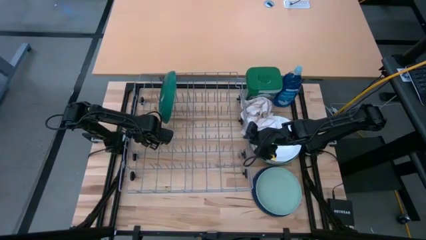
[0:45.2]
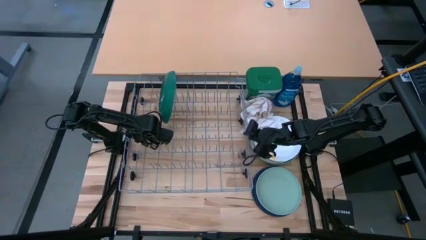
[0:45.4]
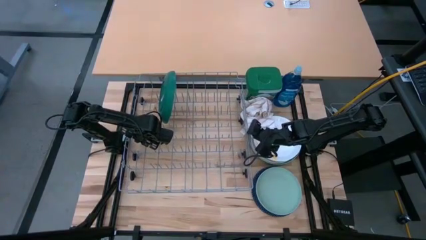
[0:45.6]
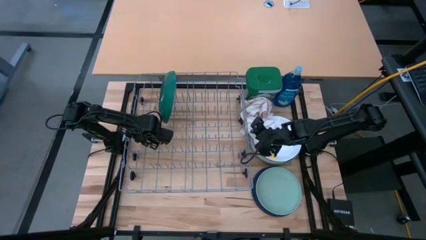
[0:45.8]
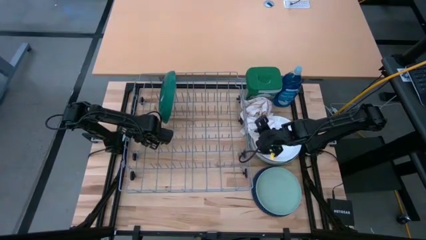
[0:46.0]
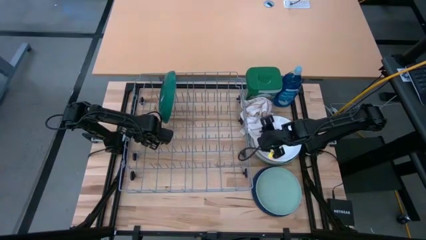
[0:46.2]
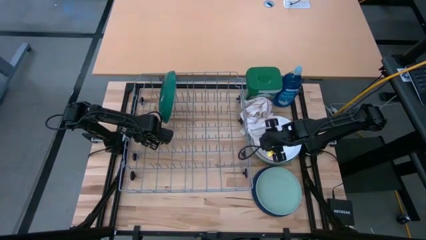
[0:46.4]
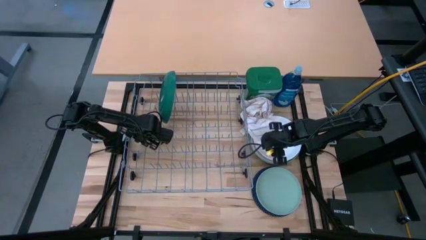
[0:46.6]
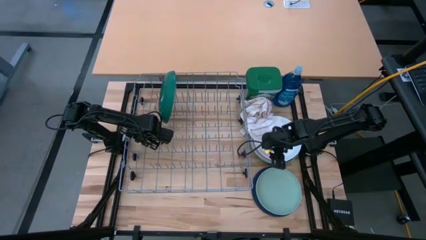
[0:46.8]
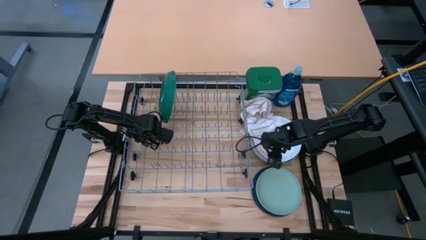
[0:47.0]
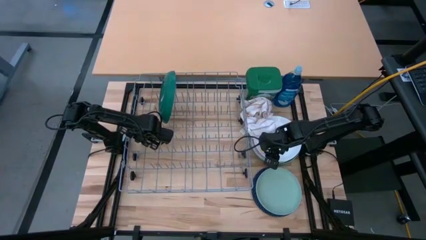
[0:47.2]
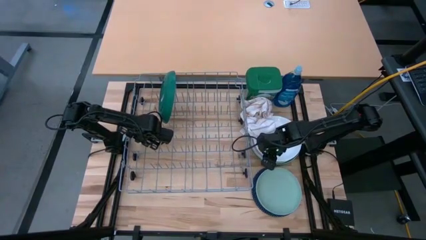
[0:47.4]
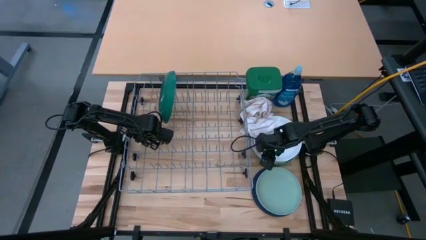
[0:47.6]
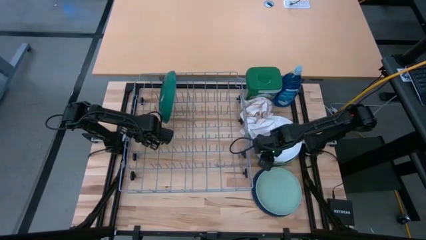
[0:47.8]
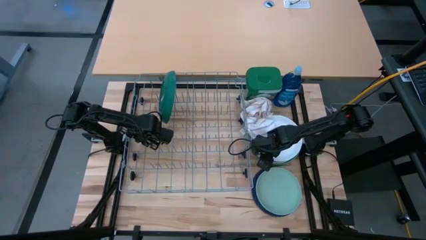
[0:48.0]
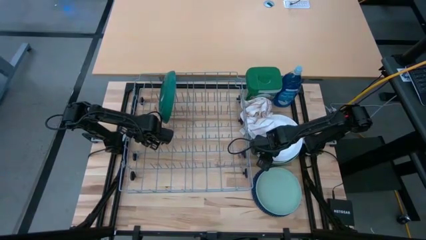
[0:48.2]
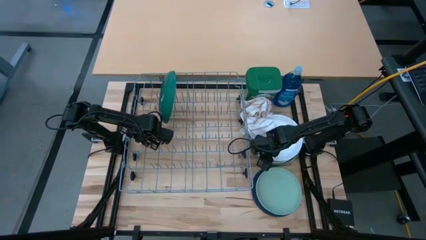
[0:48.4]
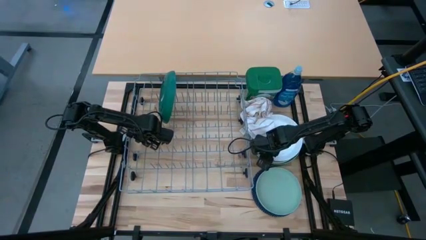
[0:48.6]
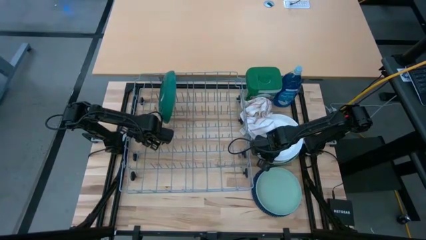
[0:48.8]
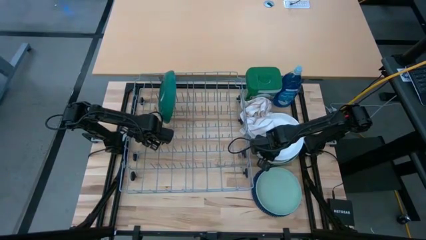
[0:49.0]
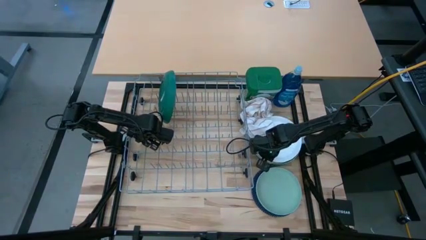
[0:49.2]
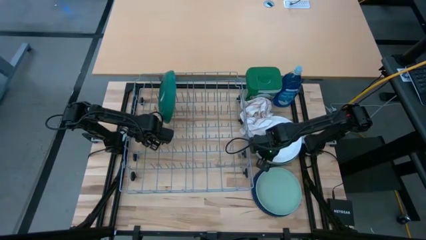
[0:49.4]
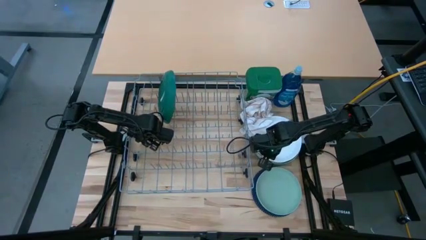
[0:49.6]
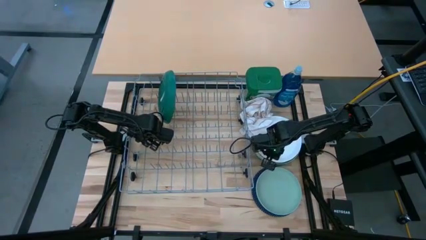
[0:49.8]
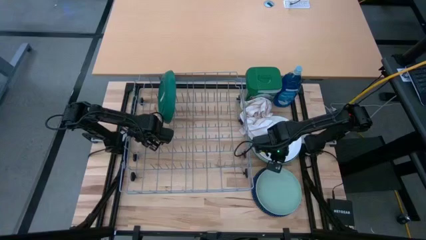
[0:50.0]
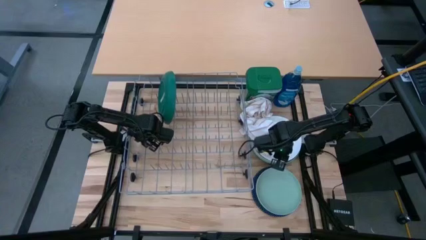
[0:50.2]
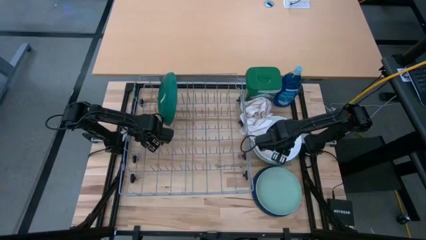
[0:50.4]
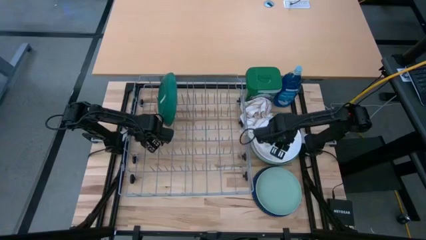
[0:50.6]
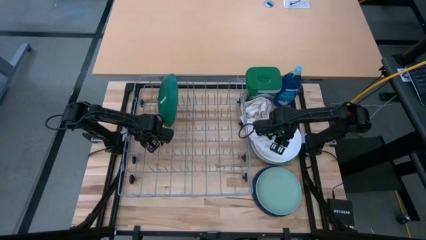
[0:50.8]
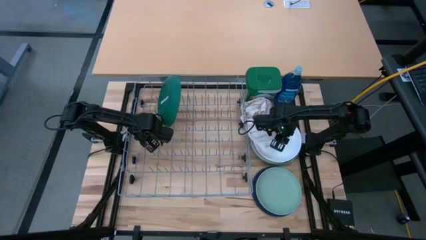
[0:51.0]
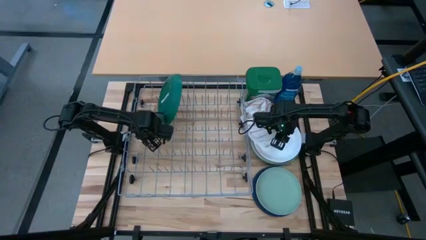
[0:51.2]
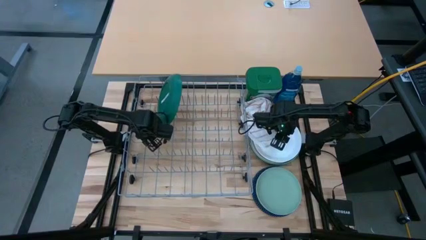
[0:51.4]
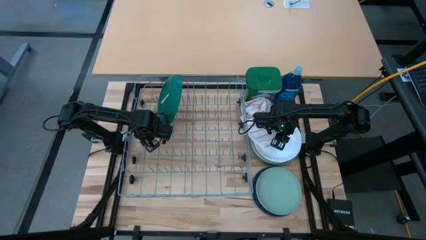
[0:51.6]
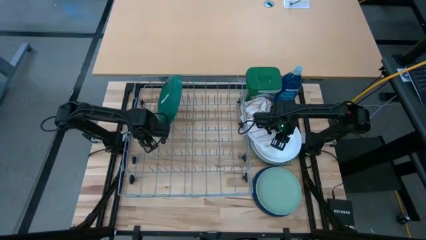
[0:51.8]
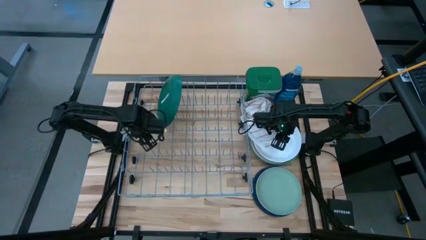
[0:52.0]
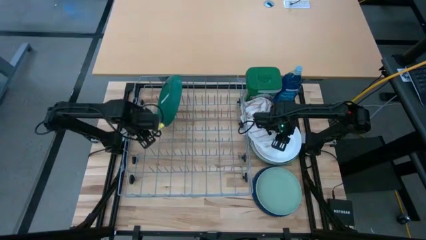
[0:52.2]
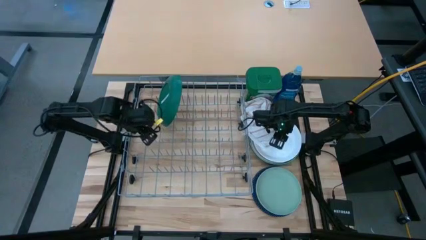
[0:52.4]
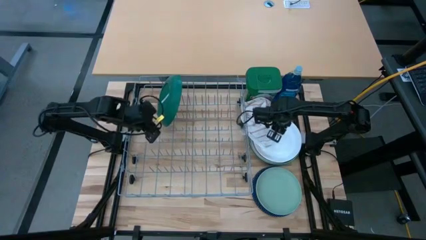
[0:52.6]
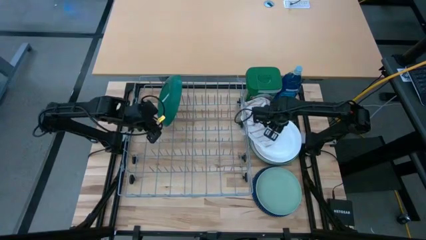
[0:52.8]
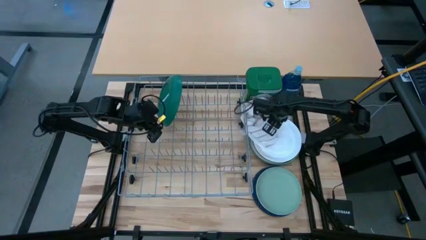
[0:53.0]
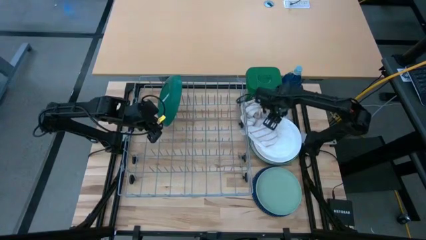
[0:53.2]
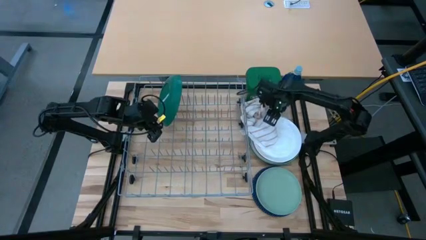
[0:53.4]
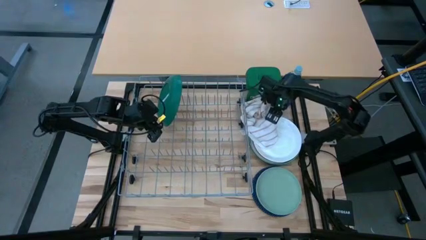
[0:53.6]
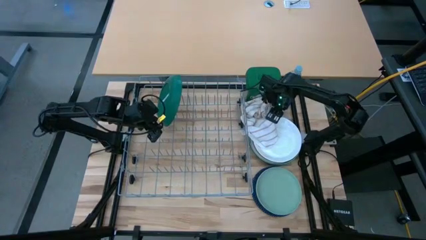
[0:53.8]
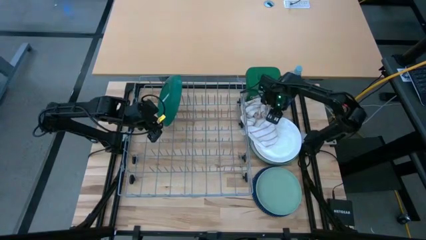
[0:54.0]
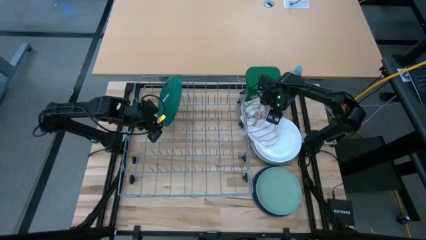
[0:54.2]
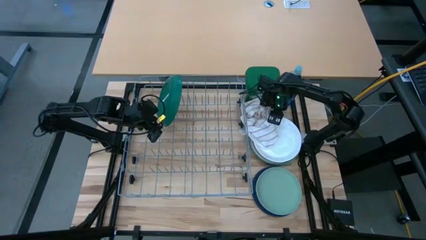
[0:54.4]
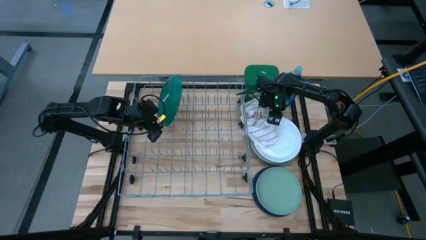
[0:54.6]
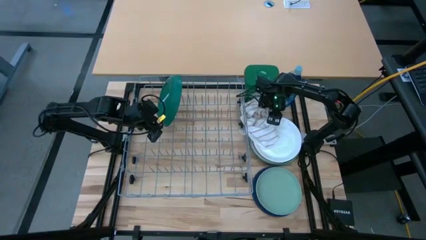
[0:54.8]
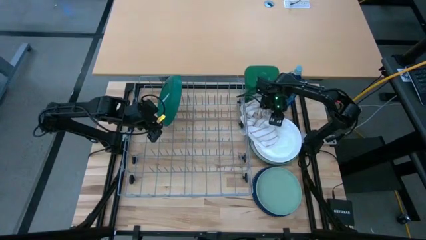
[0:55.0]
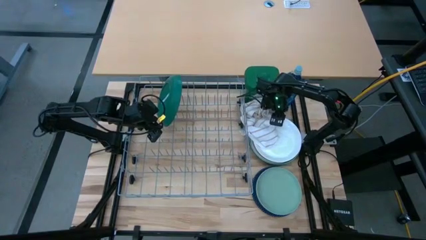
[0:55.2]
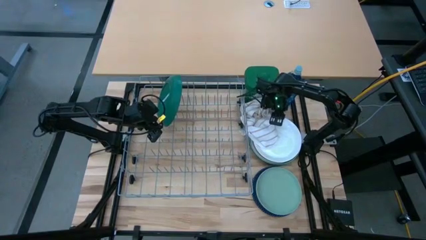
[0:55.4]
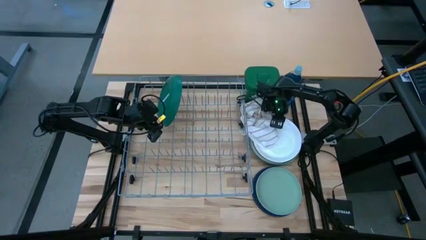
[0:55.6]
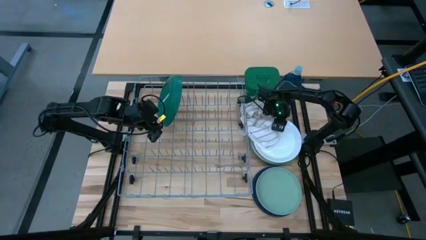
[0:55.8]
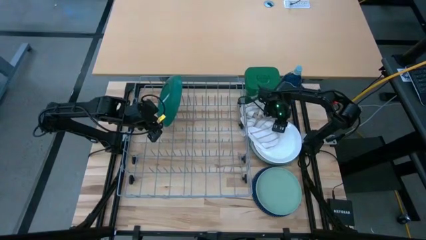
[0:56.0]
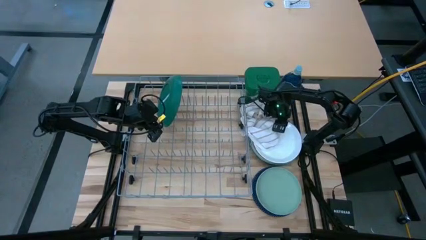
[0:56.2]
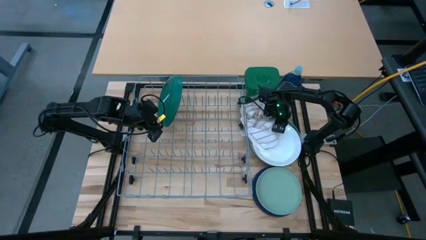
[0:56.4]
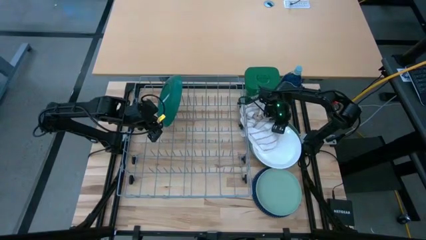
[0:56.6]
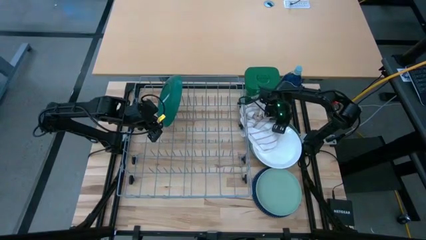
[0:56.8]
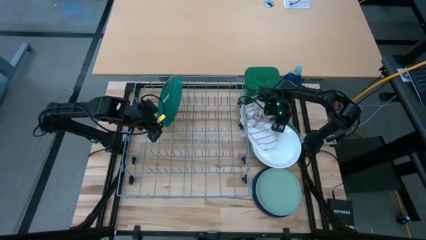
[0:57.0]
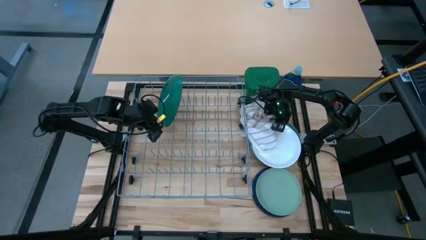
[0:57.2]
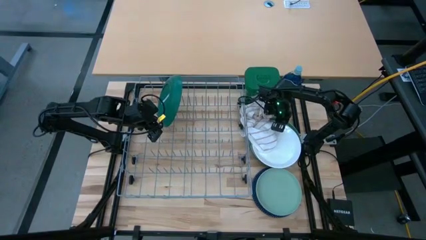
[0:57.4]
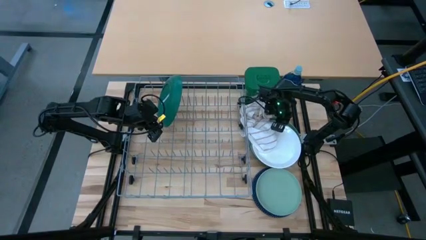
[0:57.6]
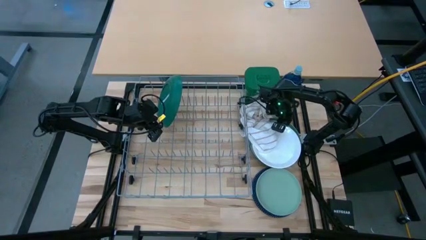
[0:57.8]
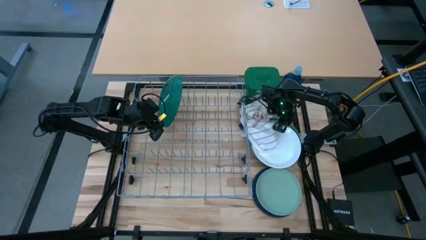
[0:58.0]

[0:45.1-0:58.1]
Task: Sort dishes
Put the white plate in the dish rack
